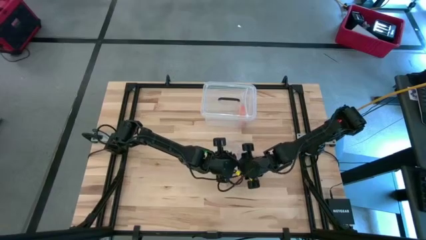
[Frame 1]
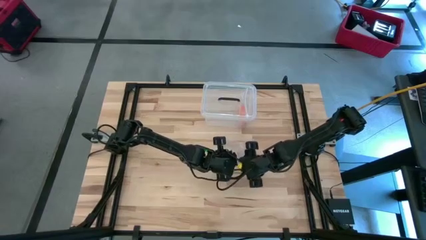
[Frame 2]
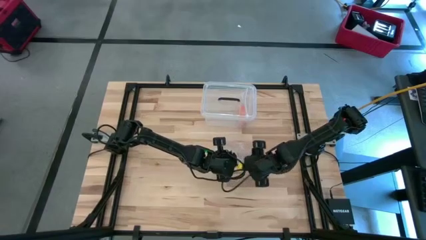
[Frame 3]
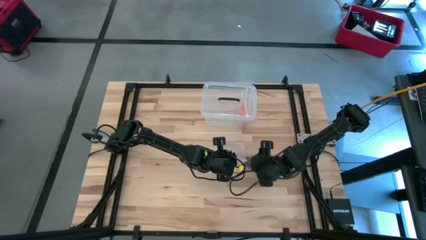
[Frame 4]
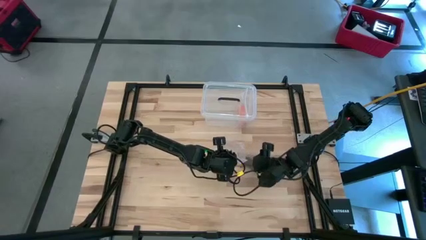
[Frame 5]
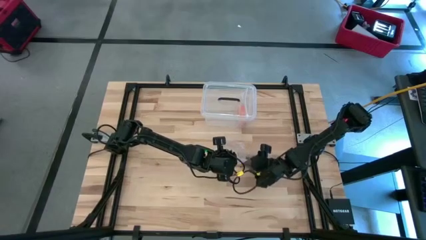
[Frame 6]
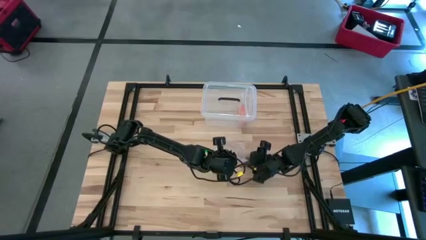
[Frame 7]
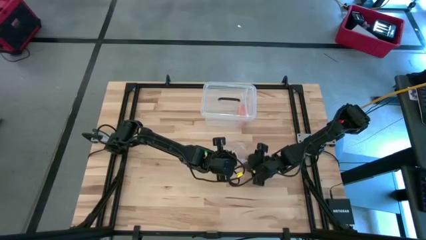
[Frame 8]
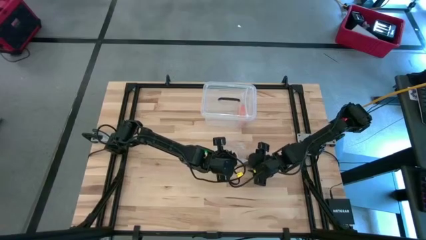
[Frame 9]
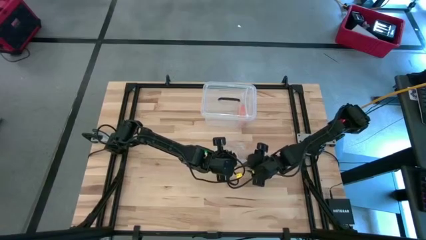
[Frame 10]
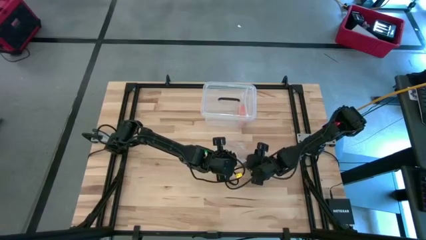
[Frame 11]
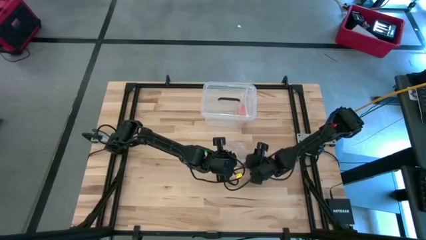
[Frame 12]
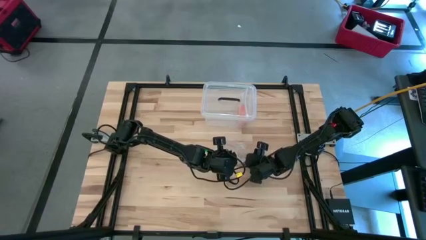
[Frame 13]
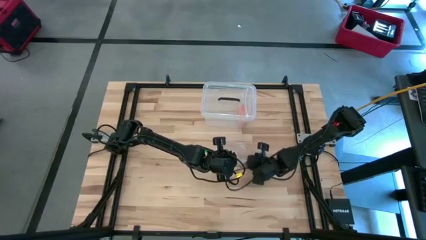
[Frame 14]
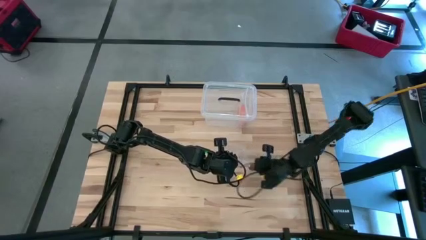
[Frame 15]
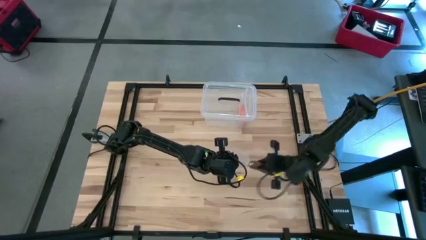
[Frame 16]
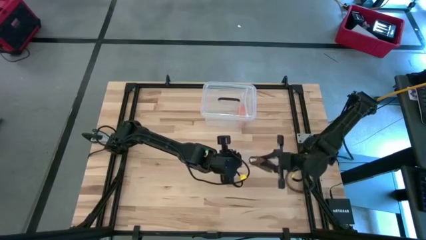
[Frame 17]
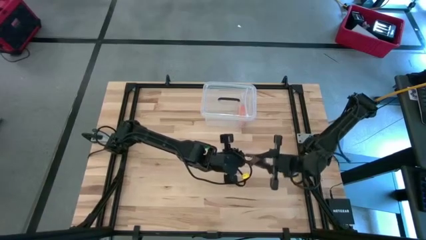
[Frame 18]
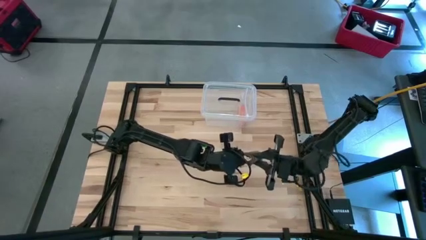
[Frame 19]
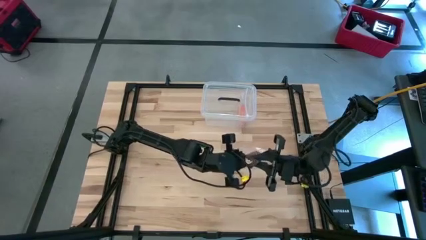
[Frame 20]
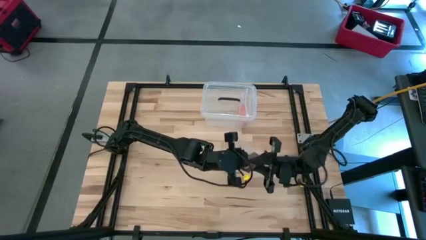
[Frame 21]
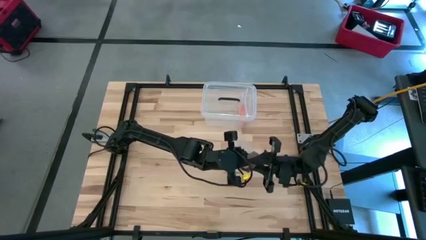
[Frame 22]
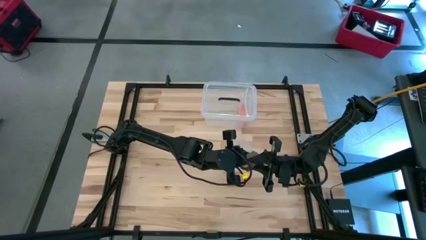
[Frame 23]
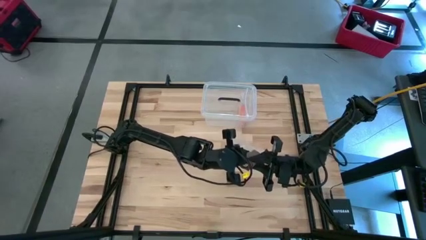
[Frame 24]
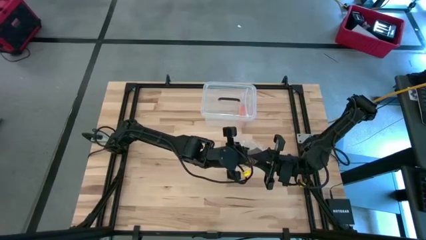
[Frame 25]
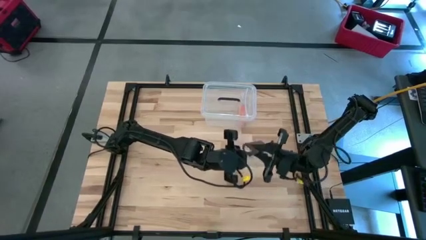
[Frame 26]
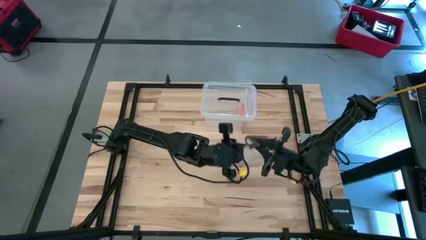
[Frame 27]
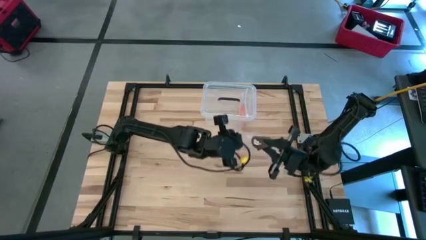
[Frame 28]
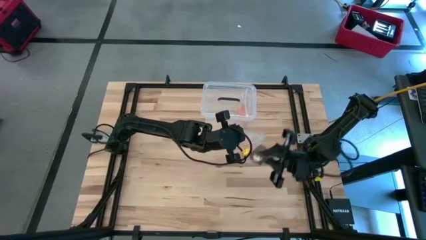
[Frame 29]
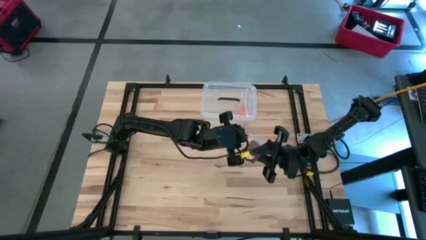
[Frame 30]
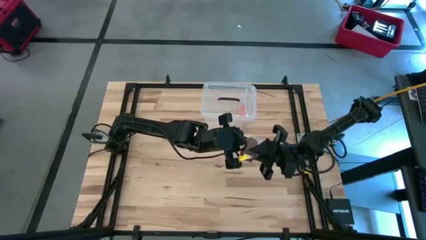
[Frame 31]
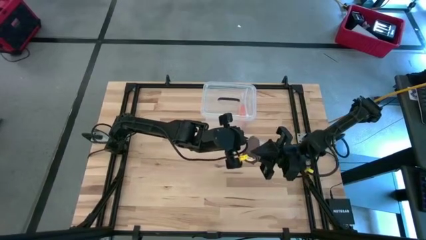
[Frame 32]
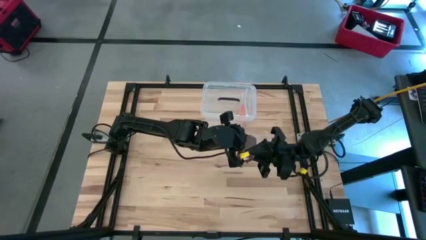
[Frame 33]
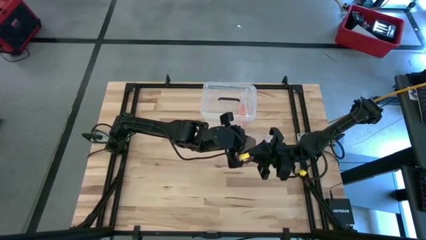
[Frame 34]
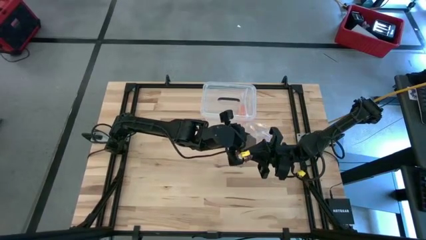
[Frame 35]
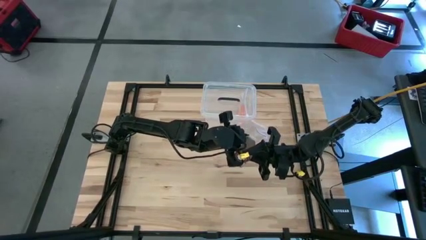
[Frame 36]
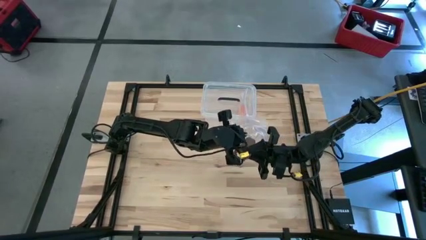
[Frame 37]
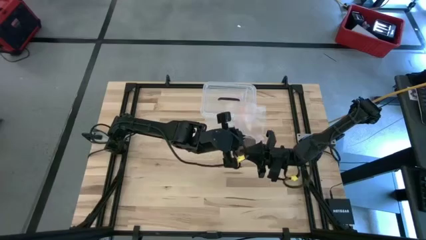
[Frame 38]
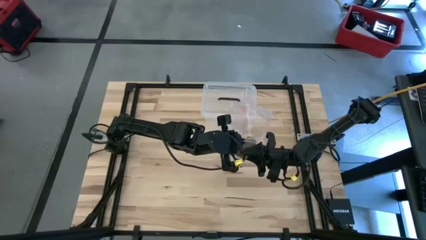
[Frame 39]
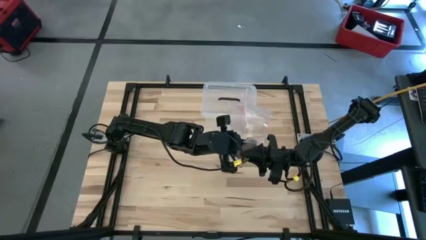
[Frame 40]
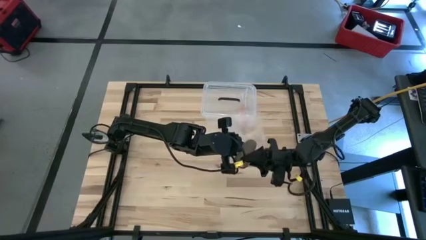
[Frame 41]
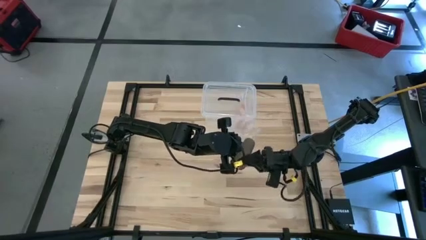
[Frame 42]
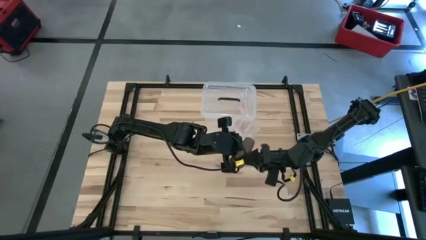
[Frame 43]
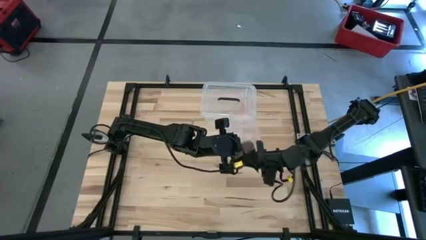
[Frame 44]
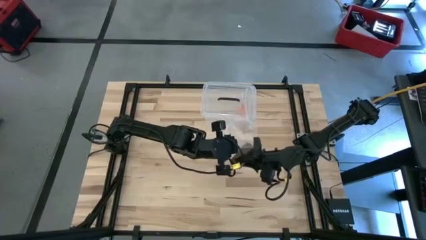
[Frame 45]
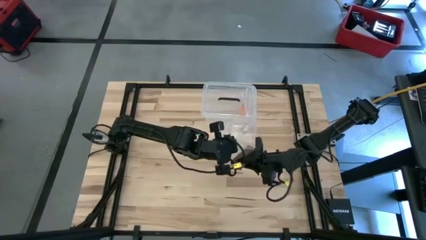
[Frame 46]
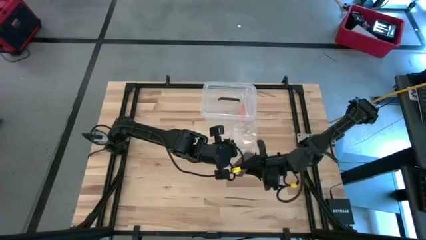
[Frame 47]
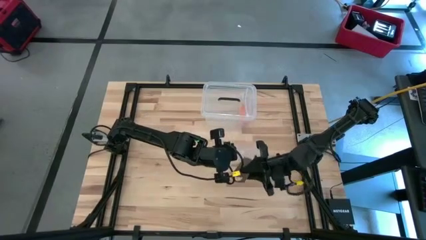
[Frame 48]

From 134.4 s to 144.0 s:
Task: Roll bandage
Put the brown bandage into the transparent zip bag

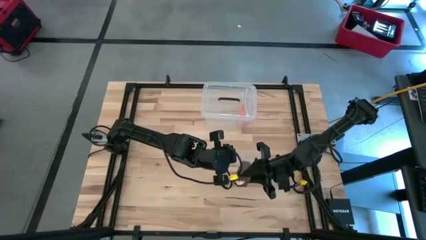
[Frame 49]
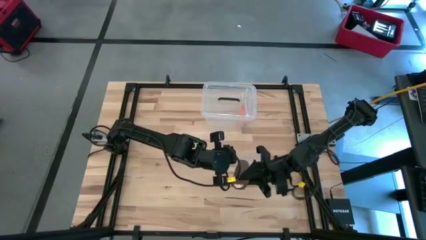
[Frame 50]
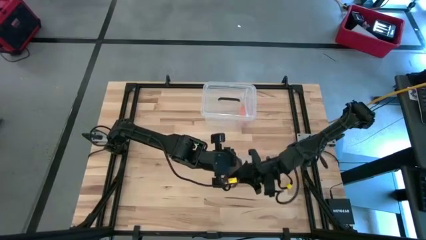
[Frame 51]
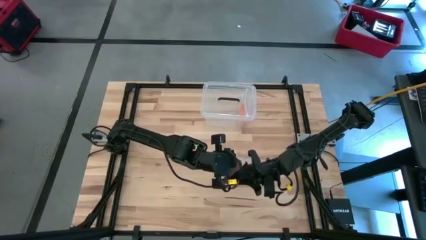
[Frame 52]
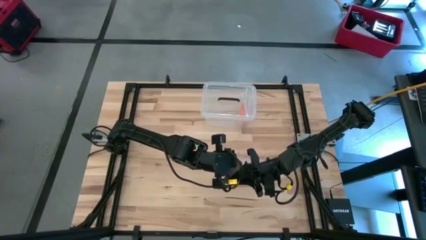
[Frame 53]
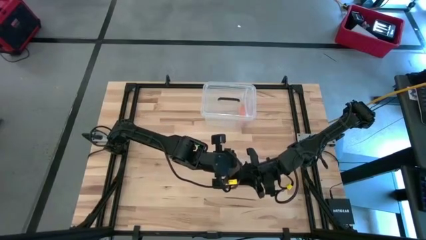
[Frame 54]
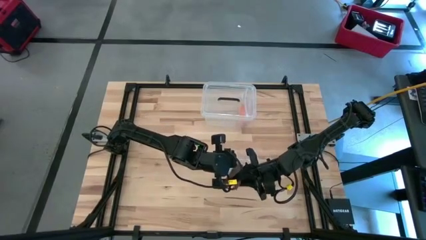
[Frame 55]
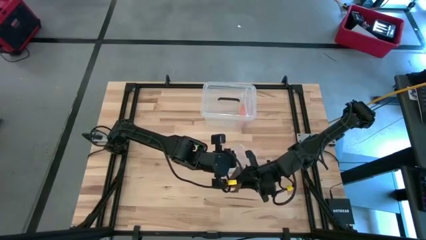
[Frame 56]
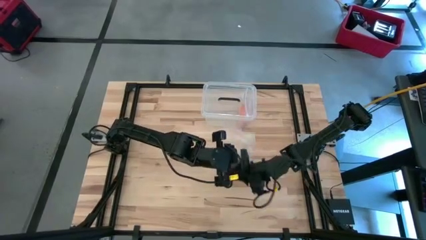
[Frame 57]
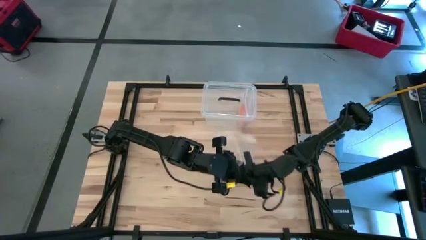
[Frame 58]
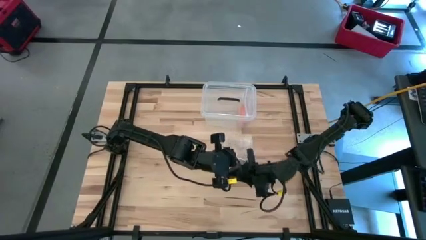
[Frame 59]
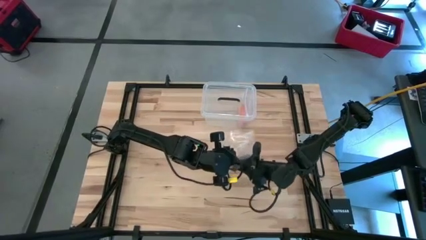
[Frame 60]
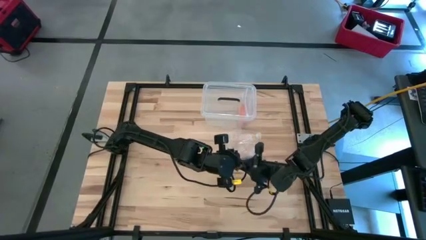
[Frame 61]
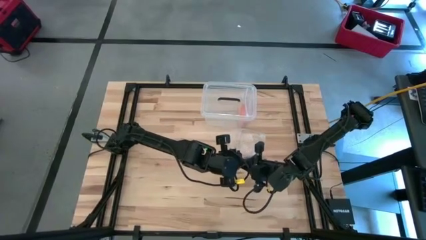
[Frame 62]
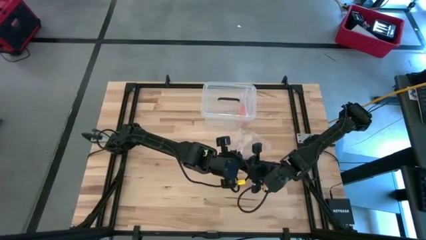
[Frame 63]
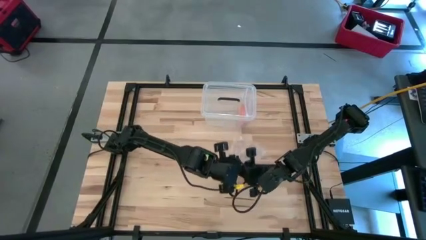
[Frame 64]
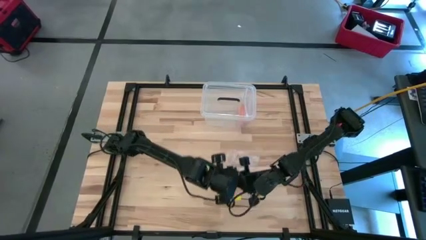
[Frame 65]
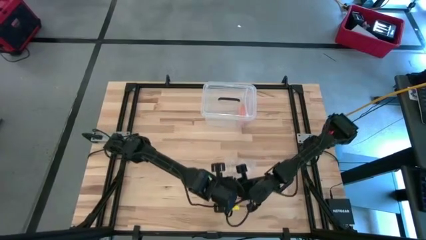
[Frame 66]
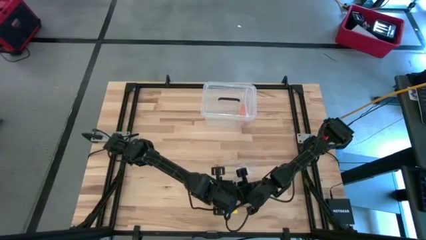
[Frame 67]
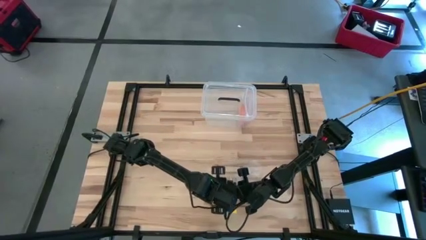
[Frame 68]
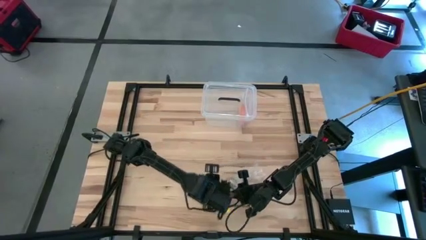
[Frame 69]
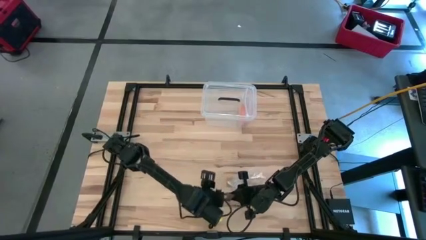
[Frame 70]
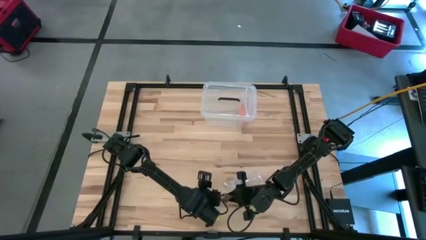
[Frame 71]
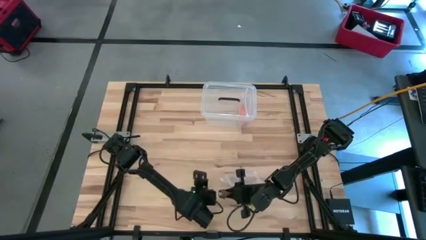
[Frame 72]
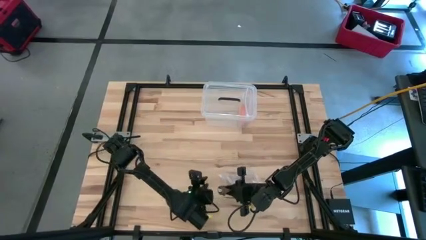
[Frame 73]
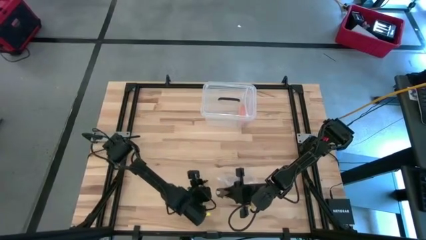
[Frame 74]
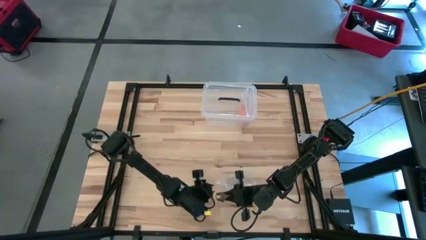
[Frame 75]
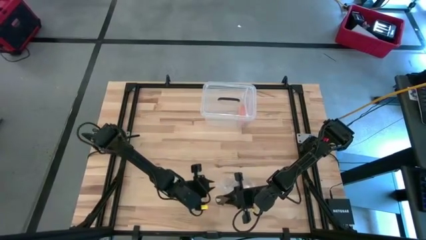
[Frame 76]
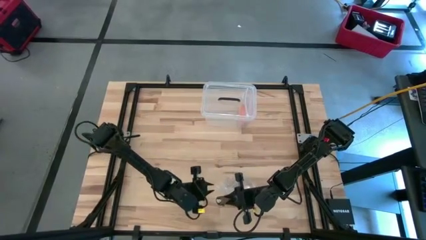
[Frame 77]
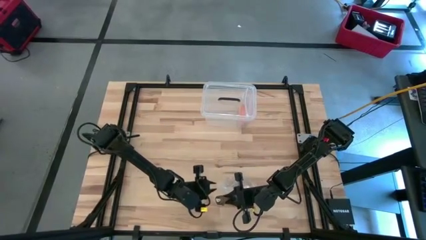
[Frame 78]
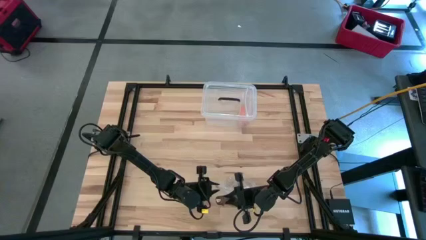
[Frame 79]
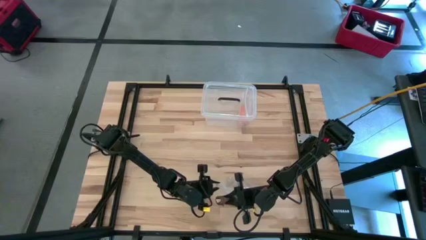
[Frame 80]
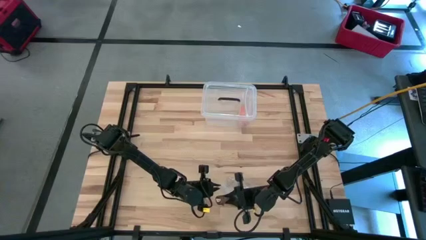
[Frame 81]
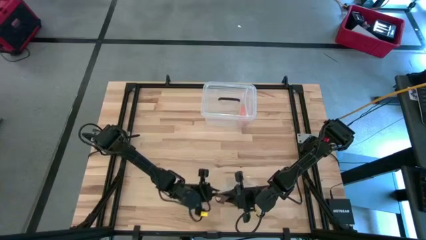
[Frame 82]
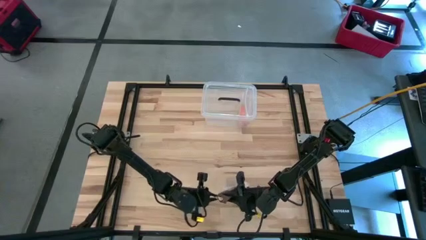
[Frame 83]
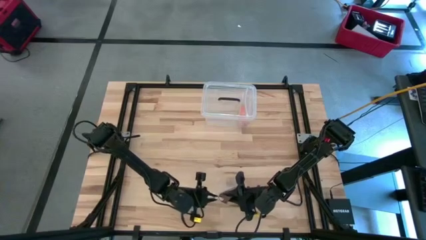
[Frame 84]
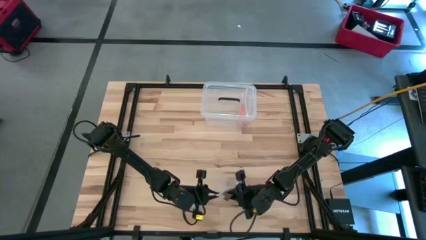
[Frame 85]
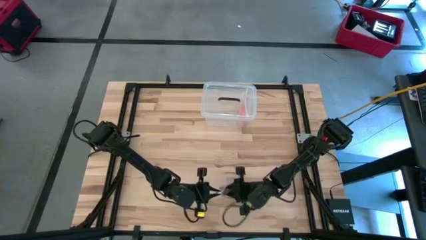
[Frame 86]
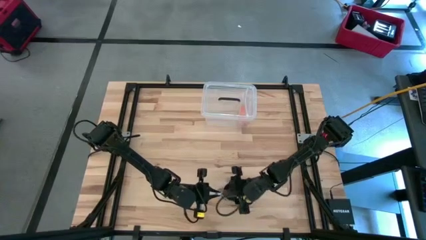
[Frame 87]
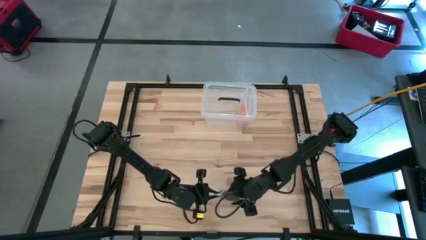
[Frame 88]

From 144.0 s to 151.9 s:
Put the brown bandage into the transparent zip bag
